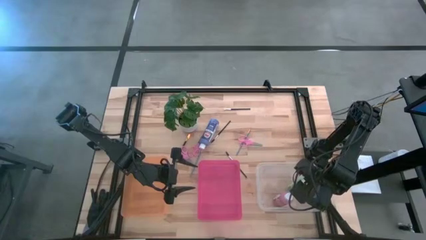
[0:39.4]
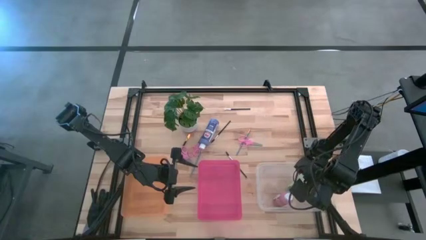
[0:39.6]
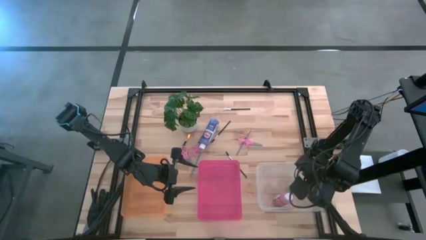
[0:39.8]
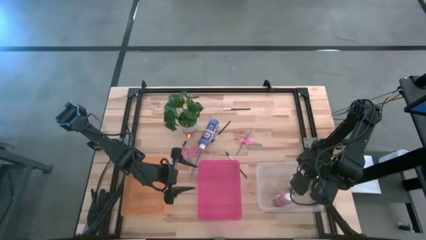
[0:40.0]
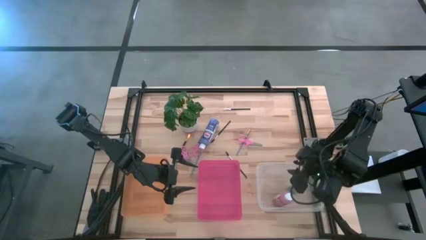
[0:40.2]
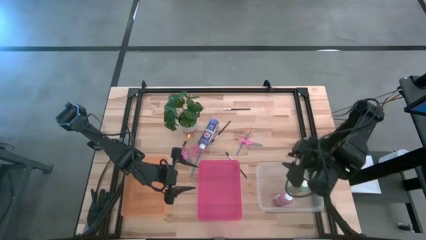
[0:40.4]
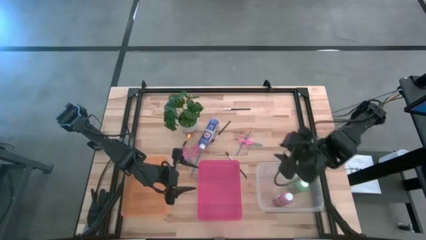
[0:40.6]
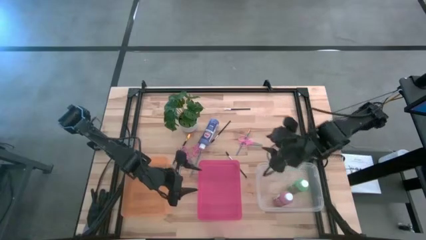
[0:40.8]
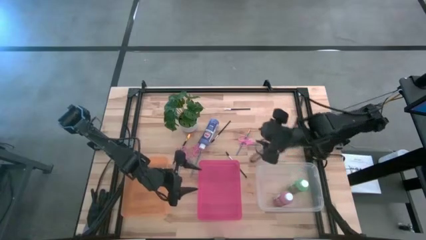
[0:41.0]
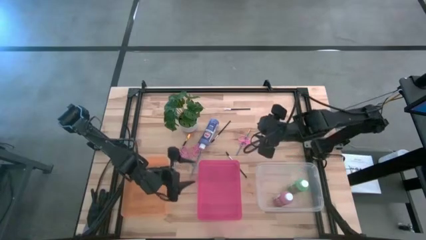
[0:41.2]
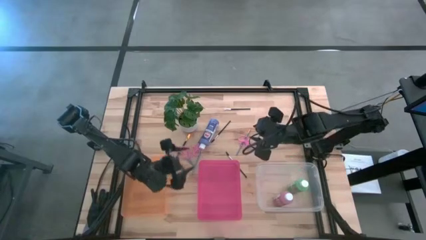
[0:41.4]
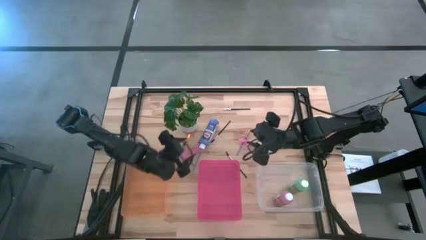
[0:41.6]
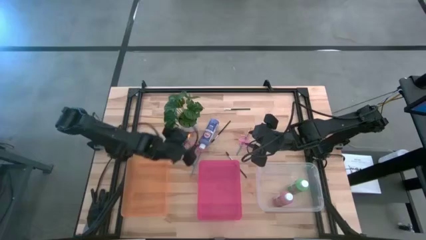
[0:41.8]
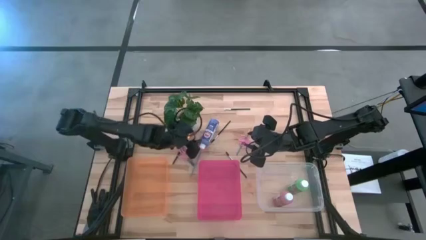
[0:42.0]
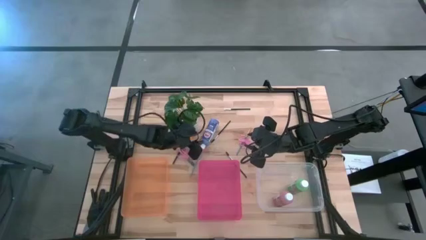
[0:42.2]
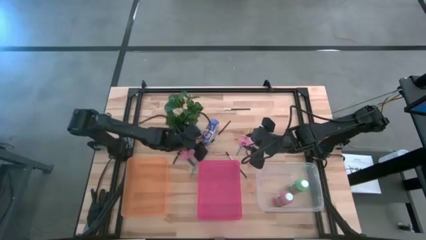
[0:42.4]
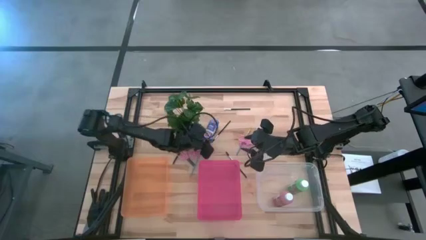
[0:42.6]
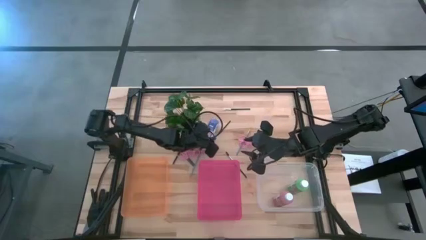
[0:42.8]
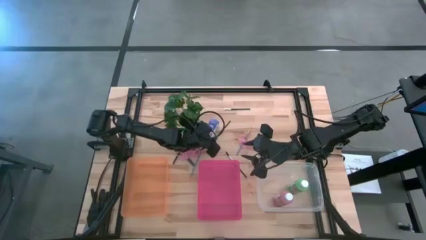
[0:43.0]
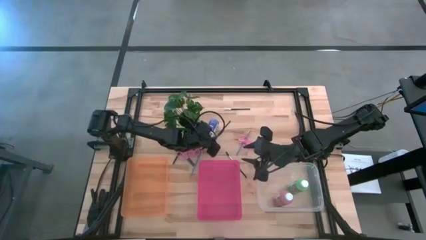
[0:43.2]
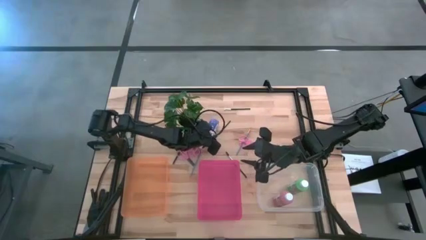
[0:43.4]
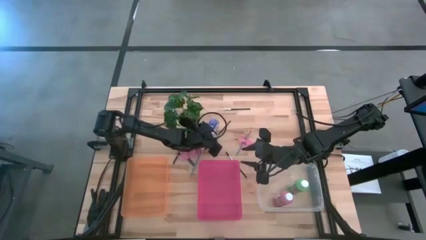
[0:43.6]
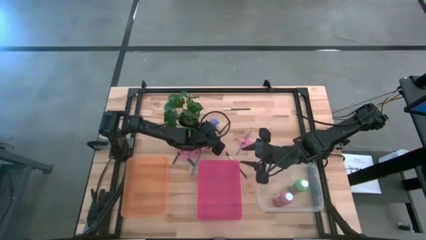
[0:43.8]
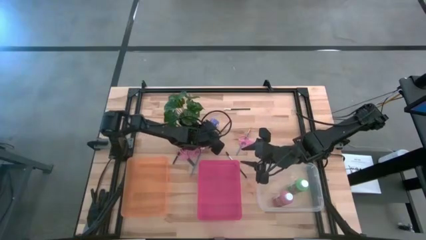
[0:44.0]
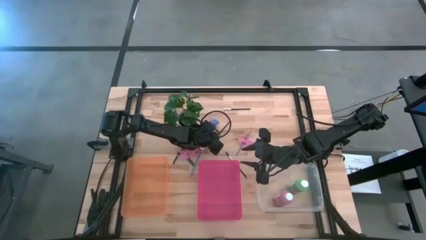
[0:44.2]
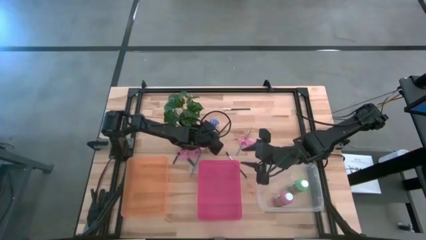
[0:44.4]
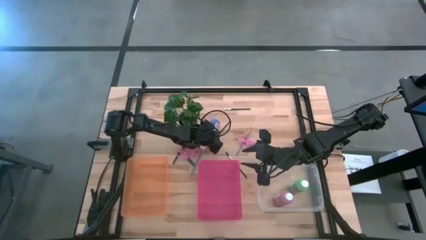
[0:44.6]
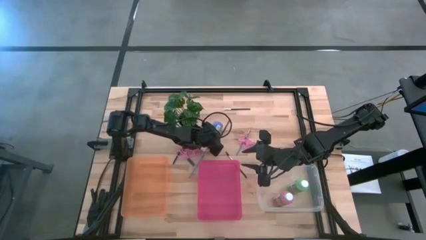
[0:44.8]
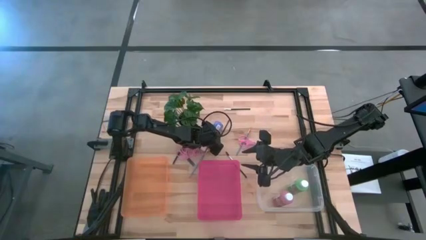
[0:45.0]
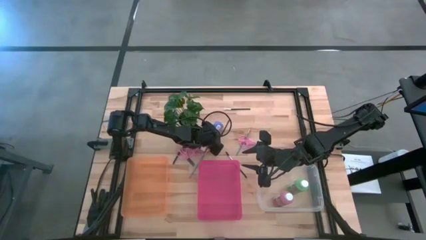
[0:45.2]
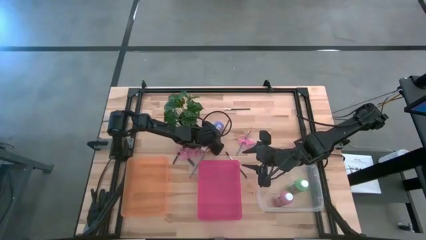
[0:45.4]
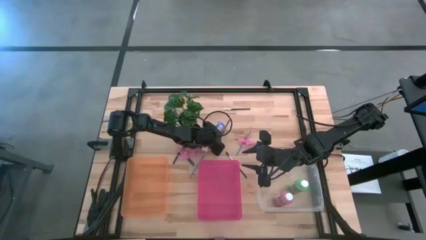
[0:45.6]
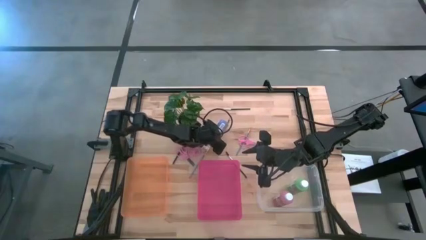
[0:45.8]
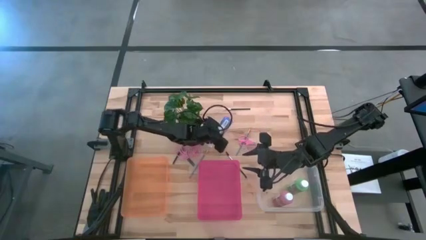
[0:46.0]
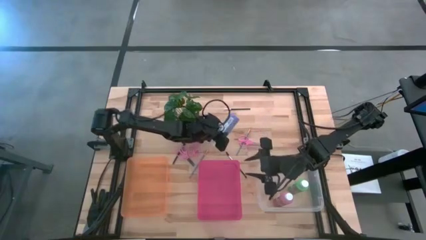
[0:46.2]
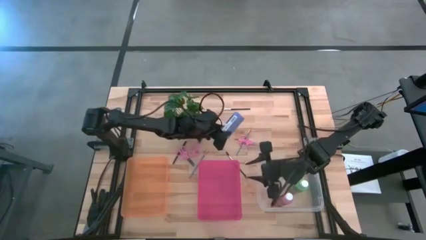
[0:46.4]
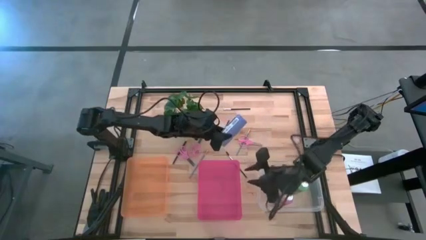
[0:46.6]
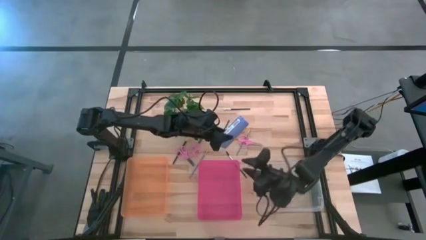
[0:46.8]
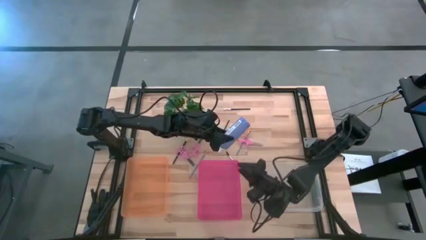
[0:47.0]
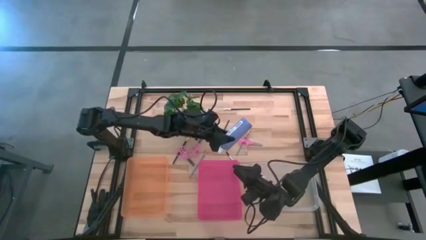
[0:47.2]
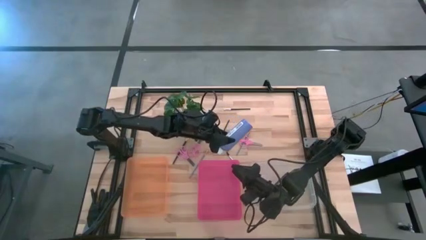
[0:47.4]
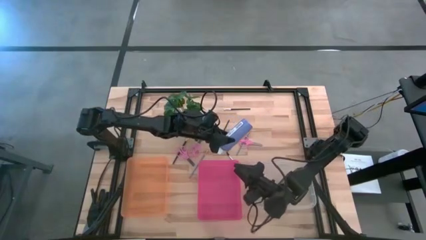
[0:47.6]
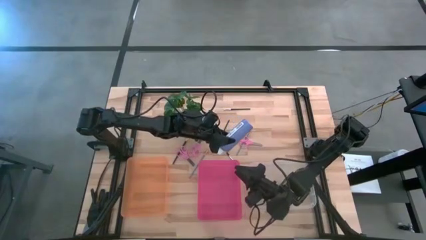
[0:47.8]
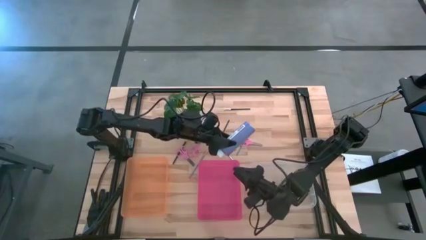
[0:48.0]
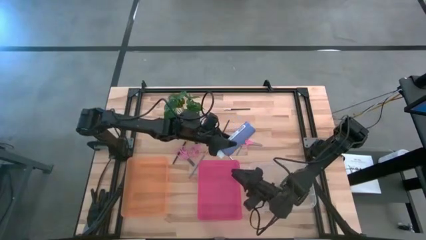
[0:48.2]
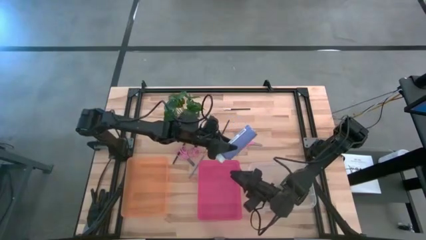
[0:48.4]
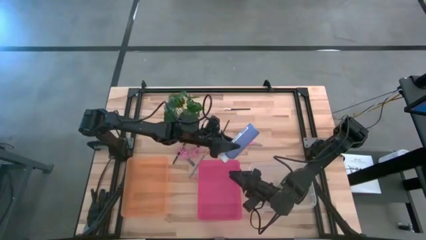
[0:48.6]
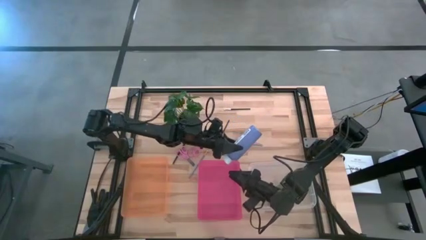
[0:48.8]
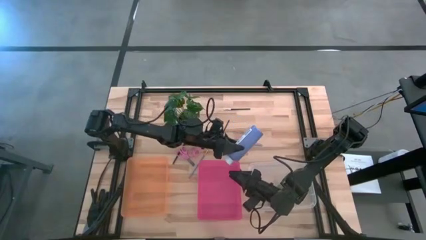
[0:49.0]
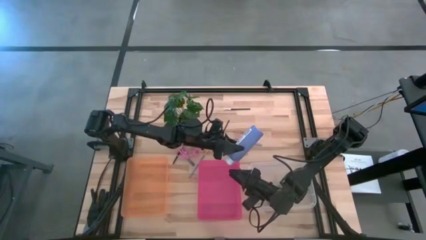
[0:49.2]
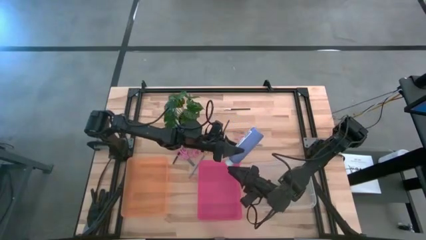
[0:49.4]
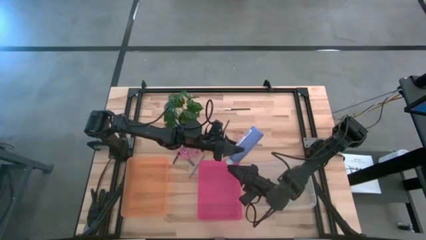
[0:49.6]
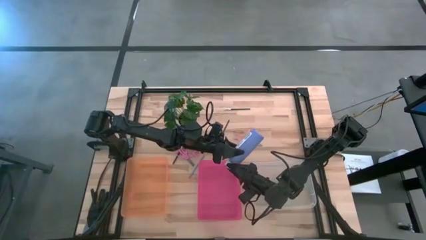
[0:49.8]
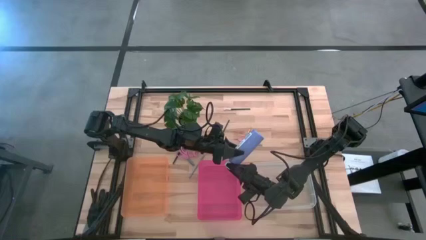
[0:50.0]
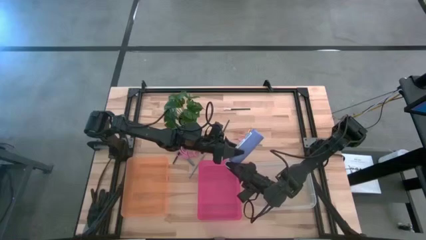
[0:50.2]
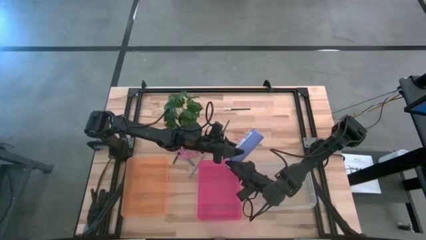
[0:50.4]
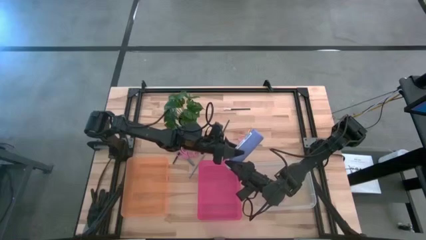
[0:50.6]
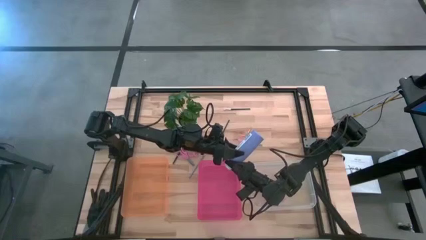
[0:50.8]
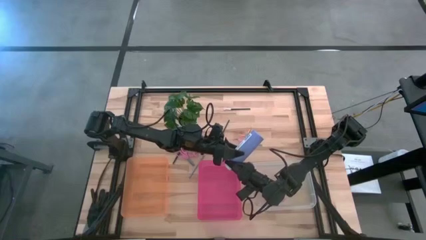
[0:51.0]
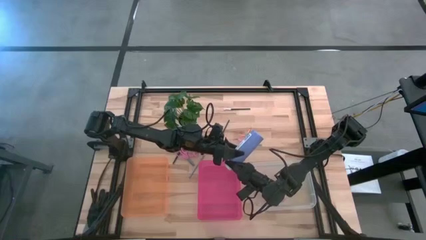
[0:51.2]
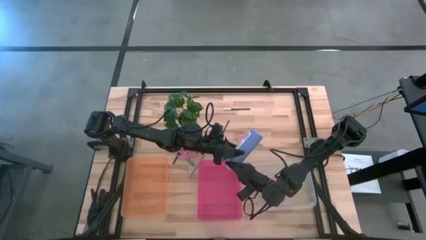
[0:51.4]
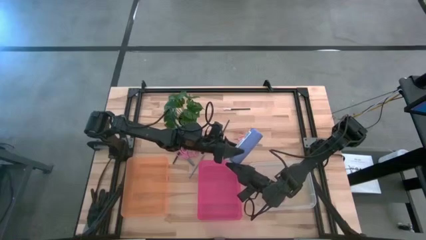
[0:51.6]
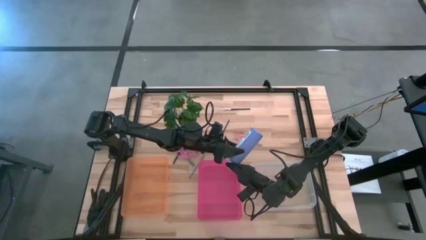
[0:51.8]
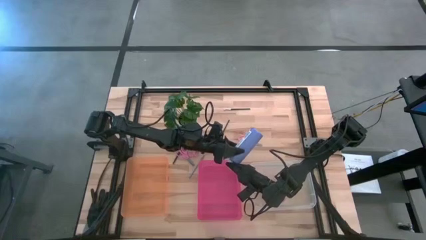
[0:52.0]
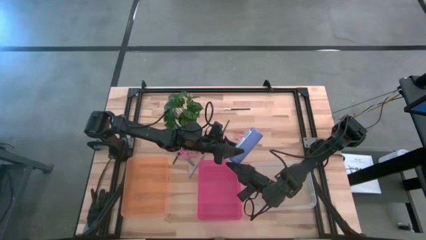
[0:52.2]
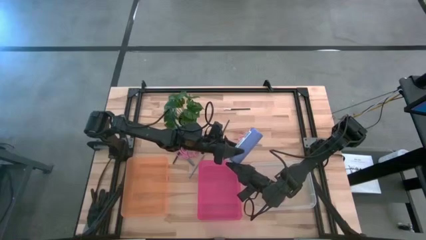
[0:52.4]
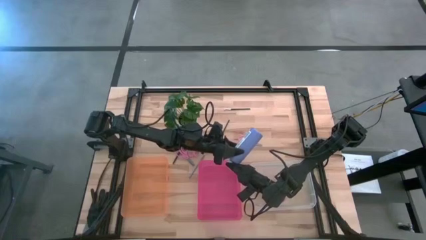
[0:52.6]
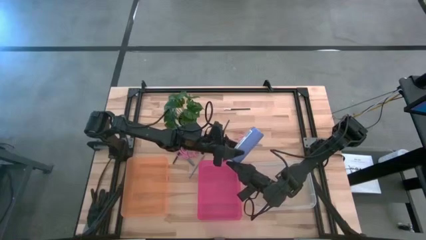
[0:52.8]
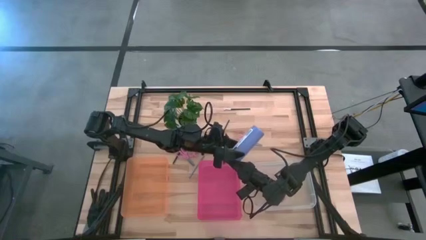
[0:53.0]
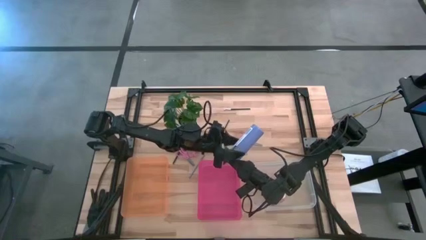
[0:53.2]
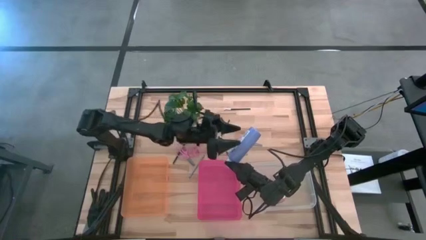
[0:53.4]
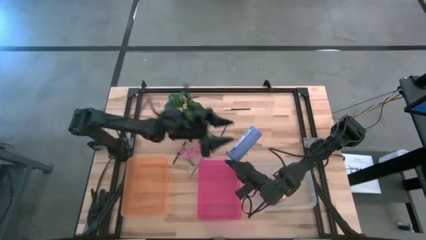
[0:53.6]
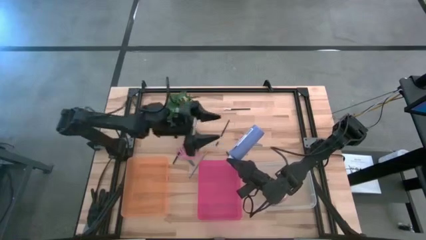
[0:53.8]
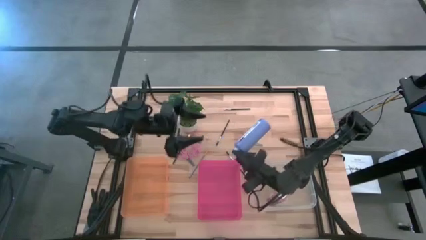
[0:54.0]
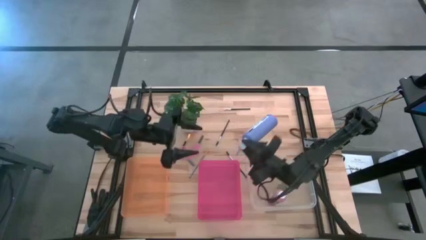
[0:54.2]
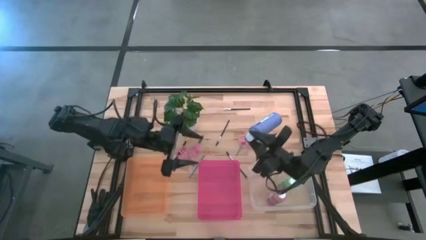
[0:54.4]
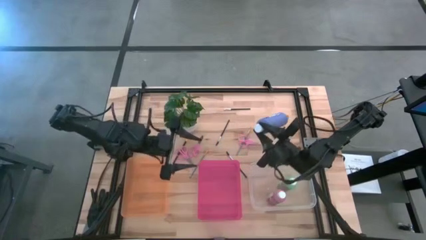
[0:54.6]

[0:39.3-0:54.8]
Task: Pick & Place Paint Supplies
Put the purple paint bottle into the transparent bin
